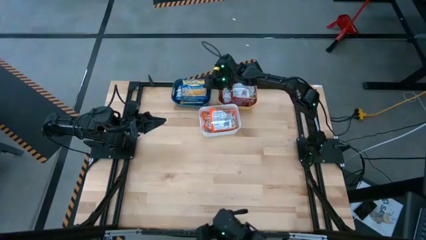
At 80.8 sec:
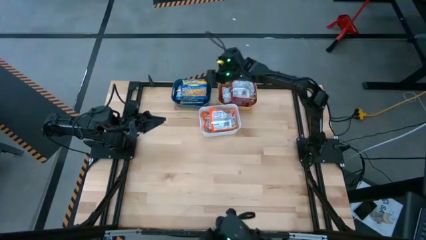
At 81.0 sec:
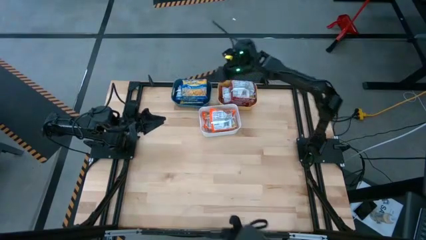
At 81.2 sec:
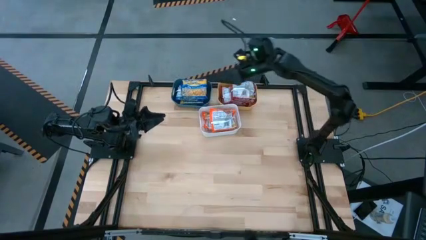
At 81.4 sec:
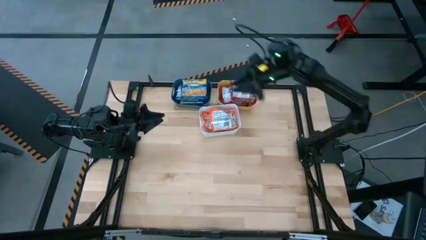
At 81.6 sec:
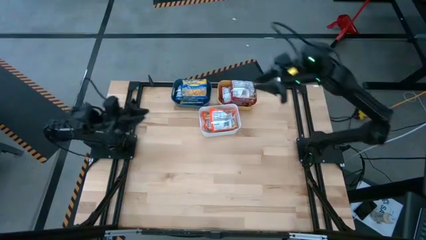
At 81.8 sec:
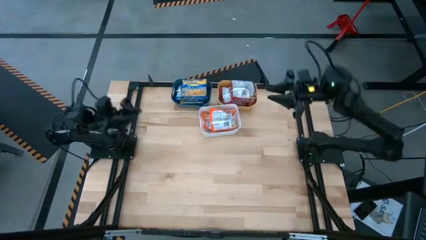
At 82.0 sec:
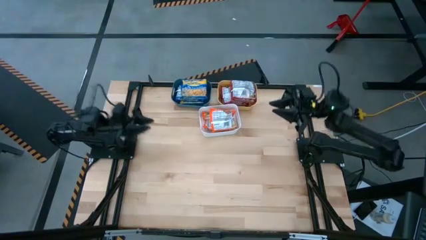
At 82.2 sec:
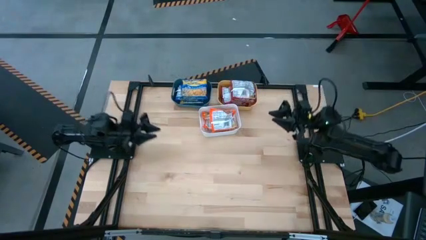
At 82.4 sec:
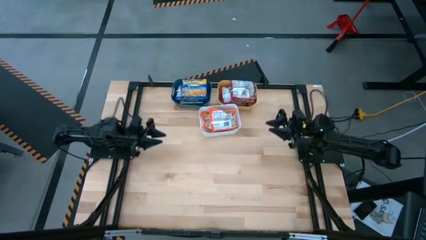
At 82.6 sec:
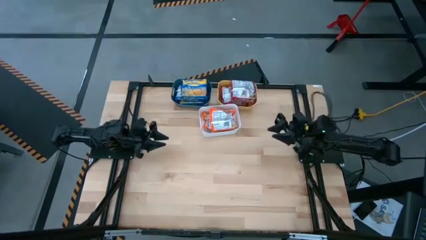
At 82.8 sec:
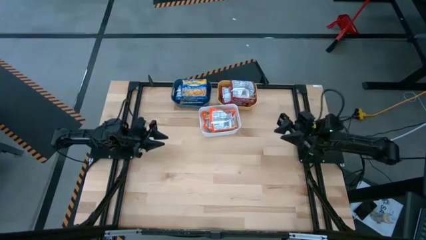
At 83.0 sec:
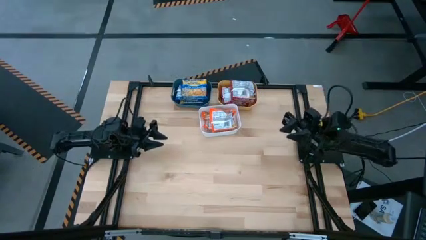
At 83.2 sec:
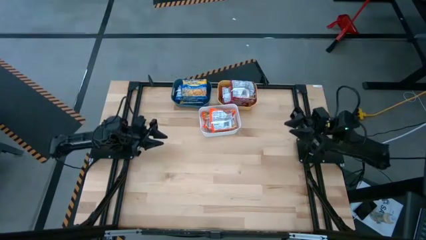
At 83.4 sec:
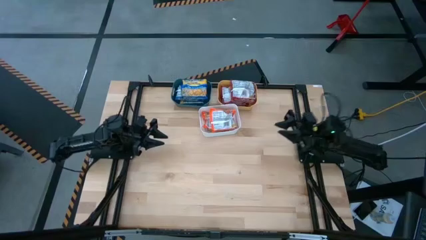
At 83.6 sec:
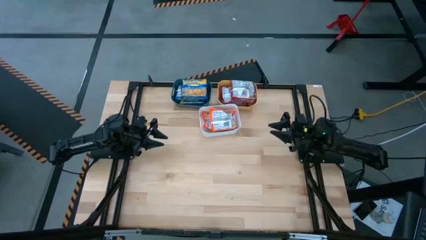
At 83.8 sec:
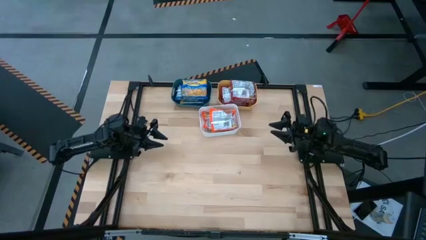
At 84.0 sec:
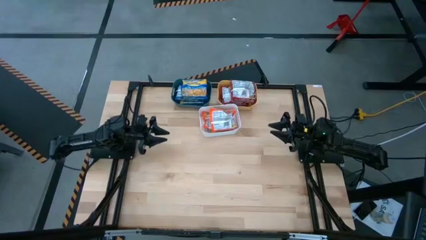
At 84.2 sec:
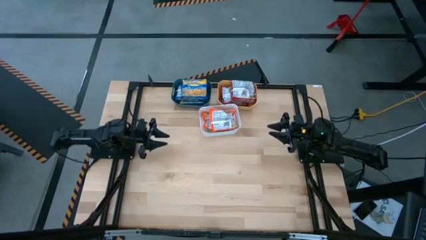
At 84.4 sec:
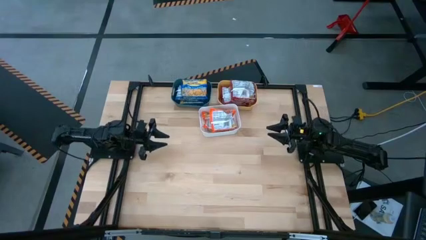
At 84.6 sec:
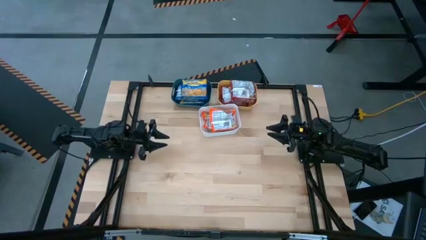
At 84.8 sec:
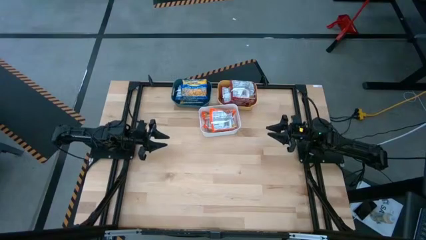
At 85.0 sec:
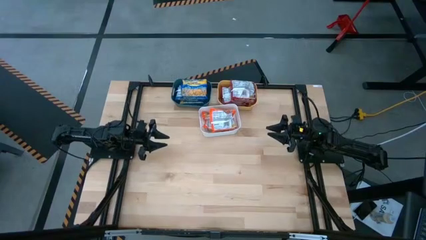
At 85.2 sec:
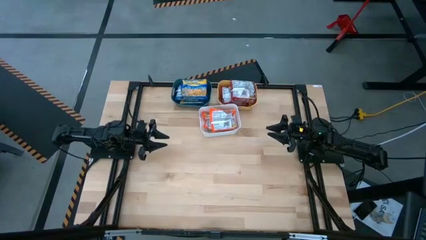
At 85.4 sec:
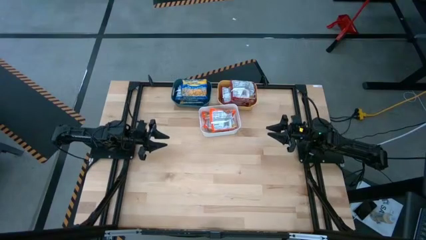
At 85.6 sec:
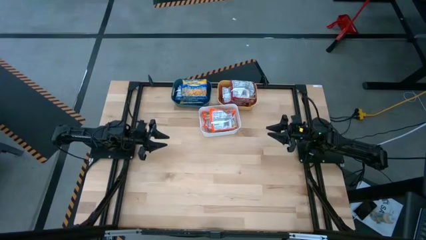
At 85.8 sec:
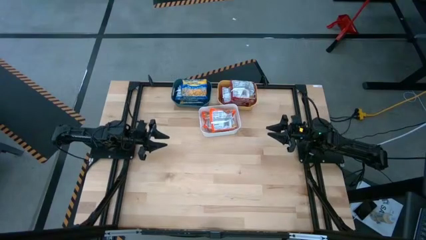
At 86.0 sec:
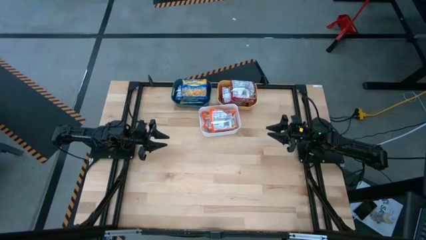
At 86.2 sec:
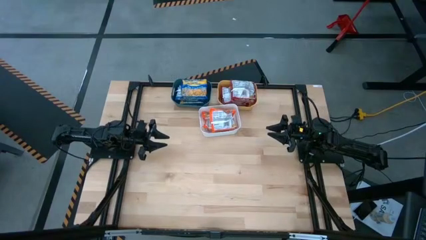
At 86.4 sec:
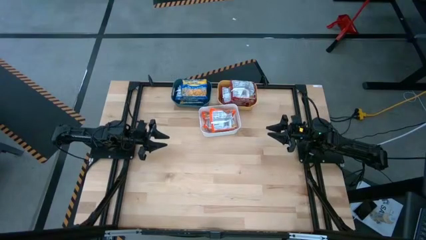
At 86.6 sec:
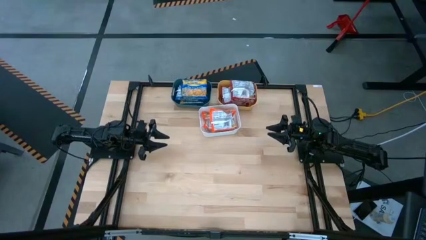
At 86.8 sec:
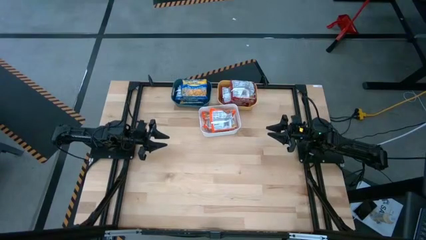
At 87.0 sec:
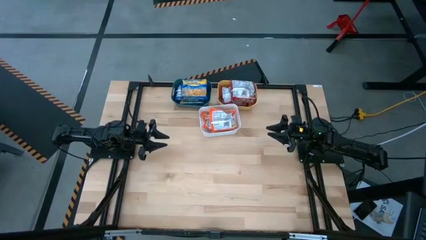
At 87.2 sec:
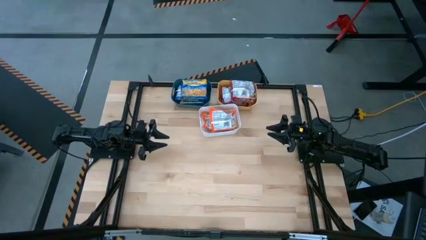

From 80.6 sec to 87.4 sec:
Task: Sort Maruchan noodles
Return to Home Position

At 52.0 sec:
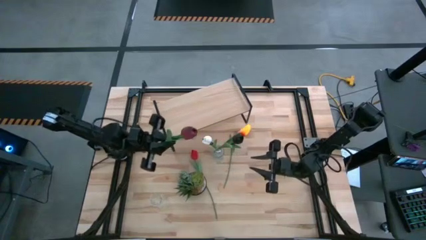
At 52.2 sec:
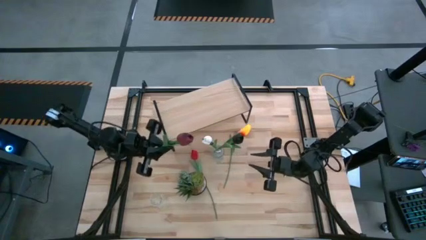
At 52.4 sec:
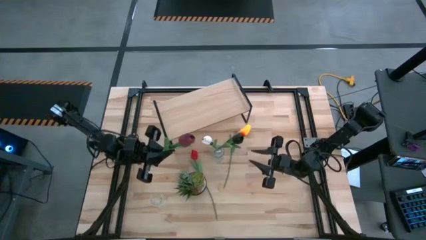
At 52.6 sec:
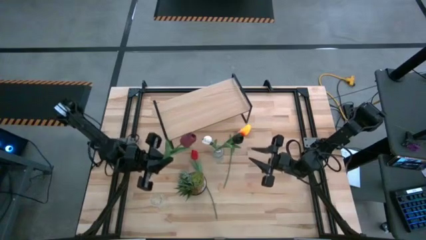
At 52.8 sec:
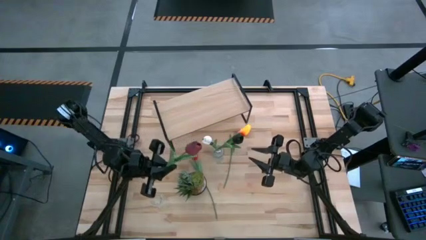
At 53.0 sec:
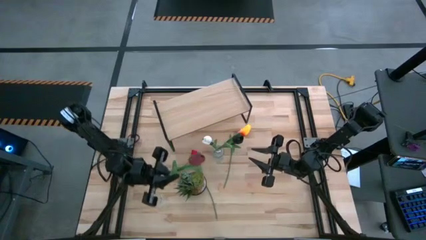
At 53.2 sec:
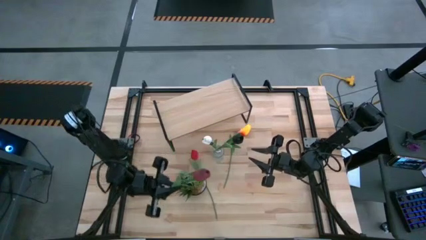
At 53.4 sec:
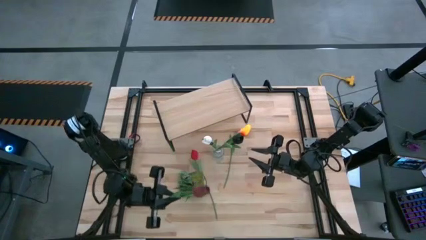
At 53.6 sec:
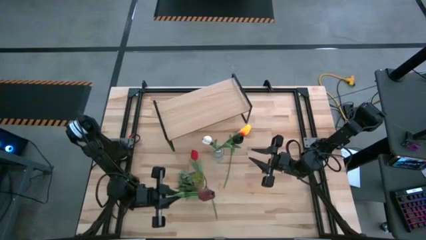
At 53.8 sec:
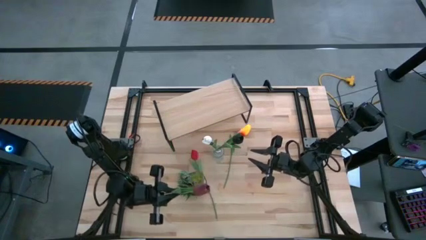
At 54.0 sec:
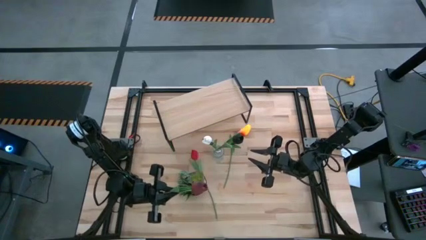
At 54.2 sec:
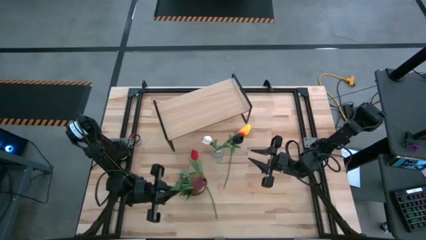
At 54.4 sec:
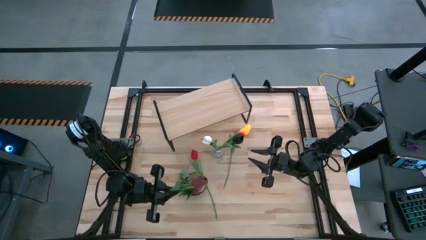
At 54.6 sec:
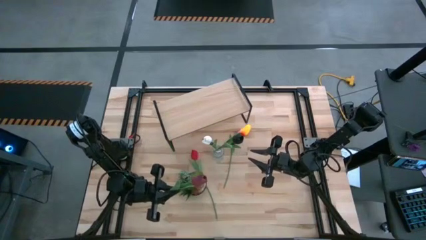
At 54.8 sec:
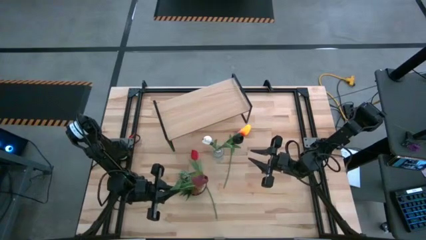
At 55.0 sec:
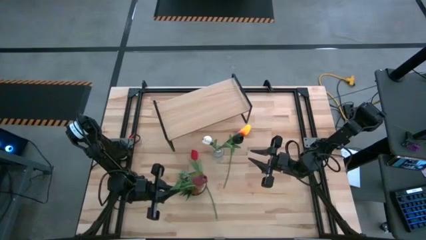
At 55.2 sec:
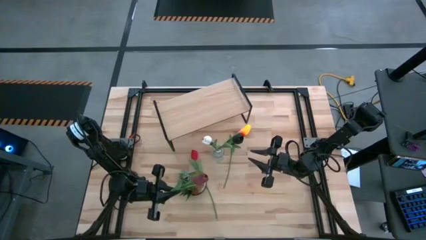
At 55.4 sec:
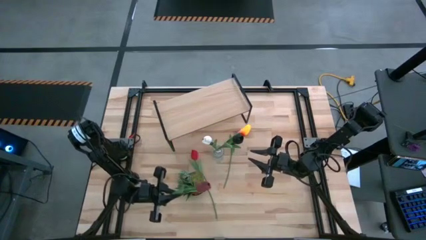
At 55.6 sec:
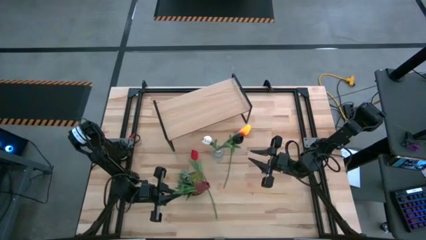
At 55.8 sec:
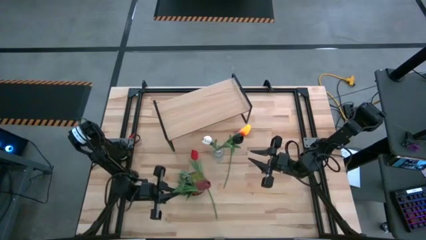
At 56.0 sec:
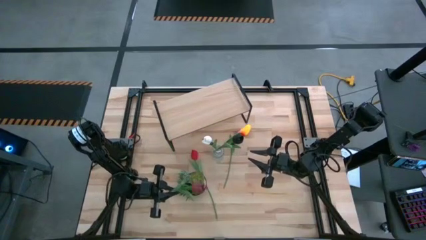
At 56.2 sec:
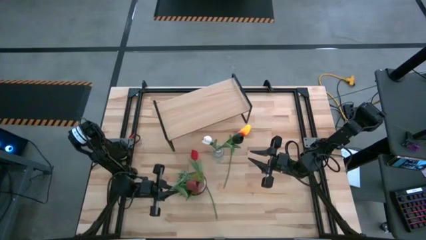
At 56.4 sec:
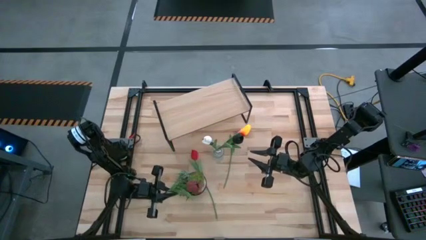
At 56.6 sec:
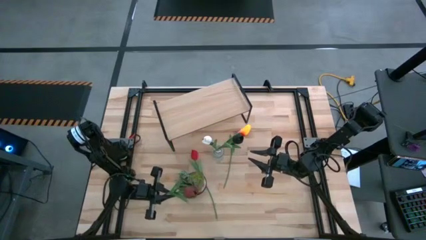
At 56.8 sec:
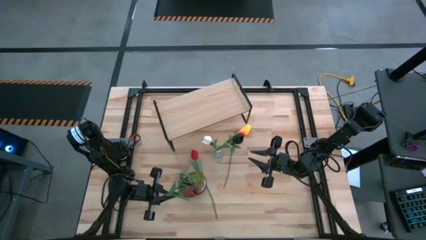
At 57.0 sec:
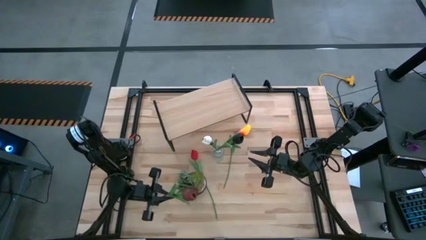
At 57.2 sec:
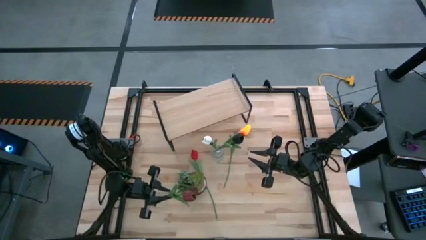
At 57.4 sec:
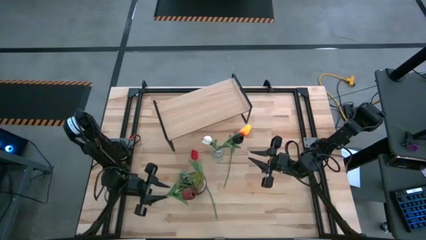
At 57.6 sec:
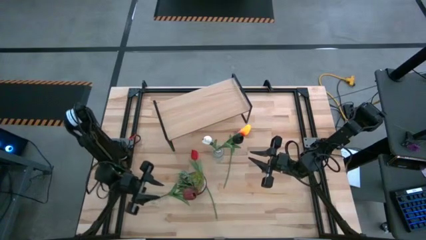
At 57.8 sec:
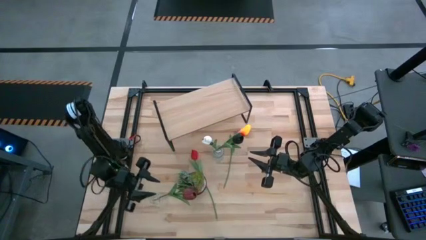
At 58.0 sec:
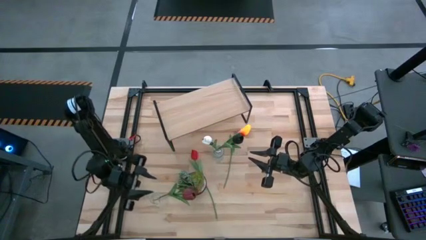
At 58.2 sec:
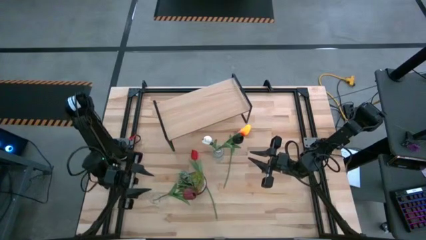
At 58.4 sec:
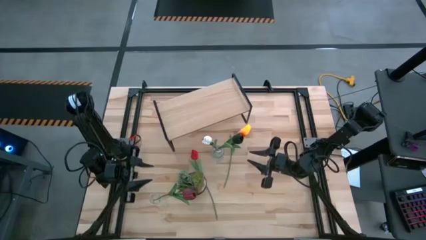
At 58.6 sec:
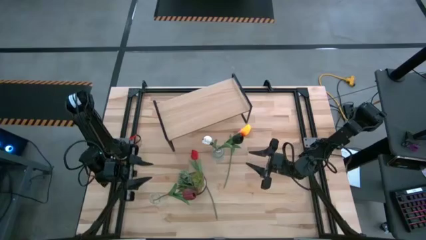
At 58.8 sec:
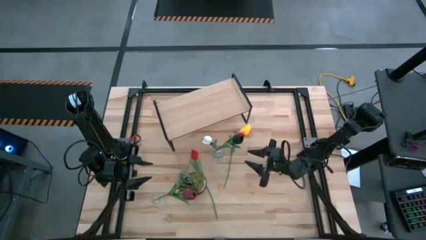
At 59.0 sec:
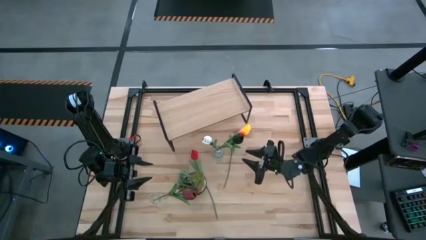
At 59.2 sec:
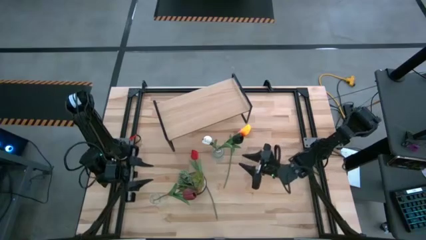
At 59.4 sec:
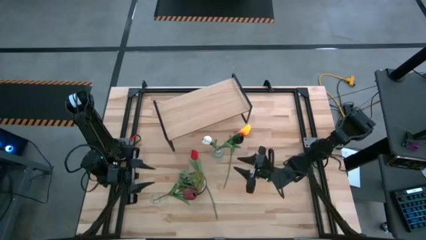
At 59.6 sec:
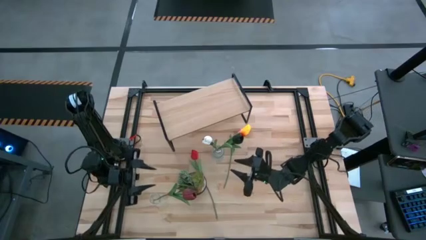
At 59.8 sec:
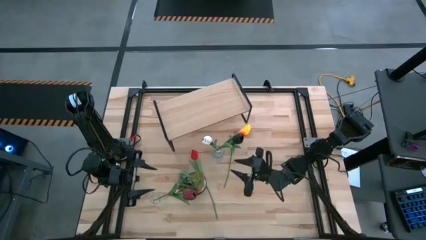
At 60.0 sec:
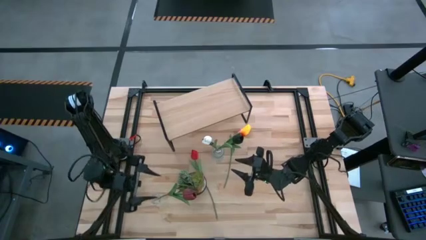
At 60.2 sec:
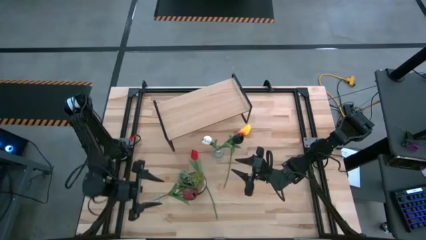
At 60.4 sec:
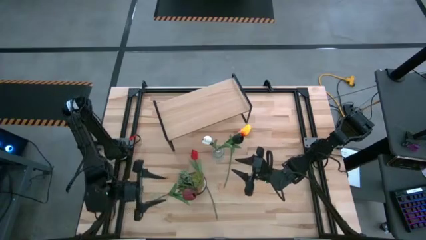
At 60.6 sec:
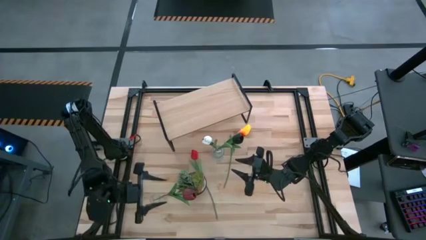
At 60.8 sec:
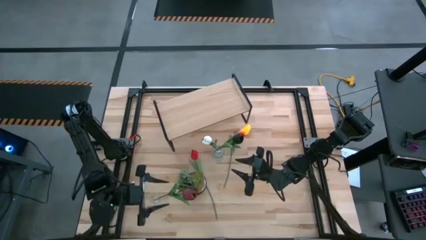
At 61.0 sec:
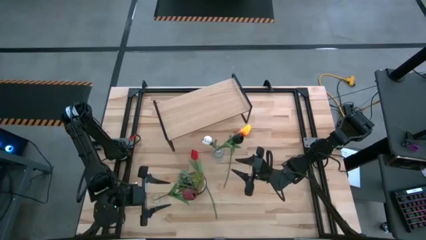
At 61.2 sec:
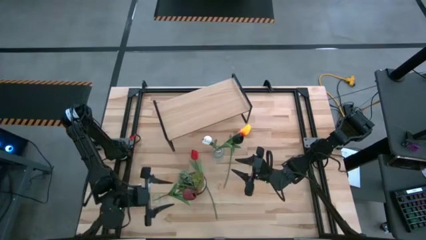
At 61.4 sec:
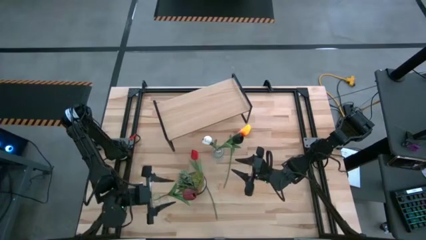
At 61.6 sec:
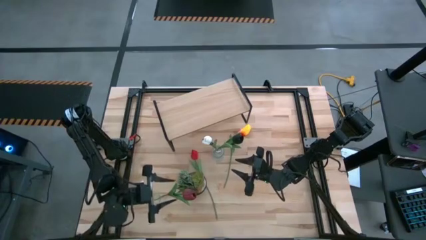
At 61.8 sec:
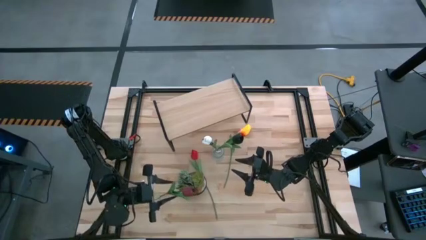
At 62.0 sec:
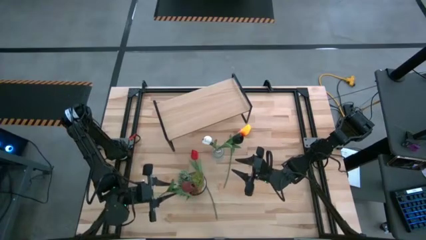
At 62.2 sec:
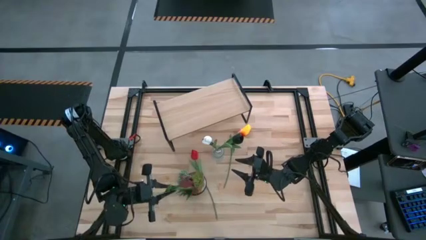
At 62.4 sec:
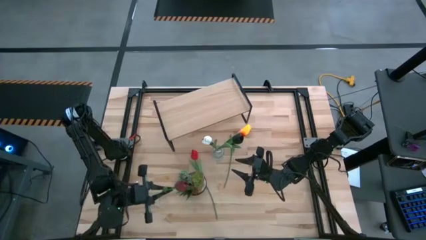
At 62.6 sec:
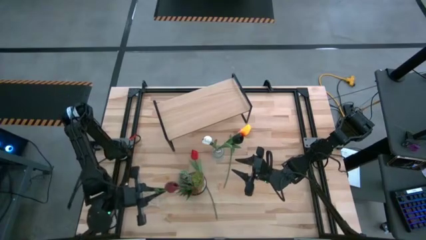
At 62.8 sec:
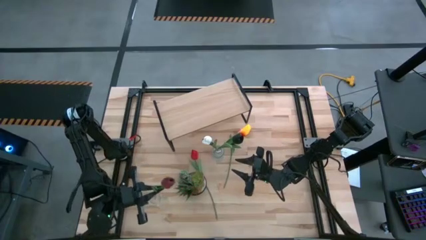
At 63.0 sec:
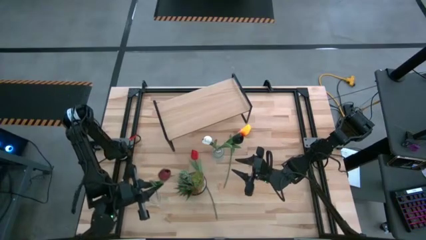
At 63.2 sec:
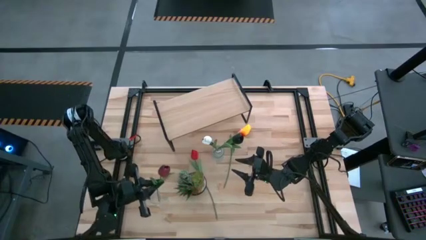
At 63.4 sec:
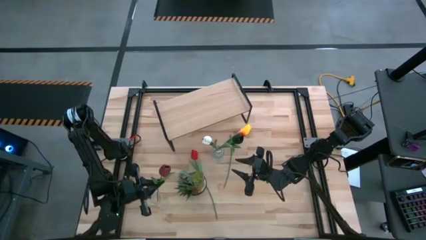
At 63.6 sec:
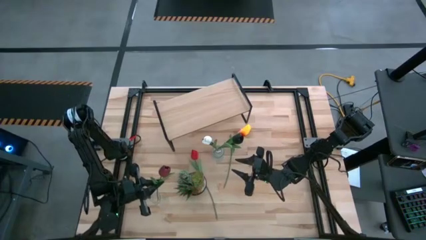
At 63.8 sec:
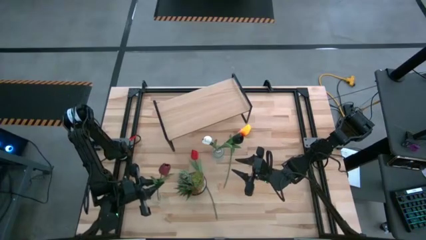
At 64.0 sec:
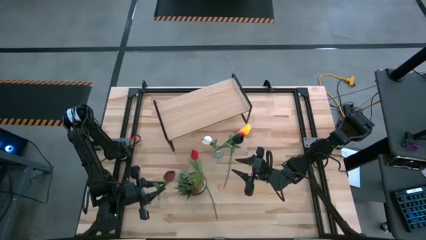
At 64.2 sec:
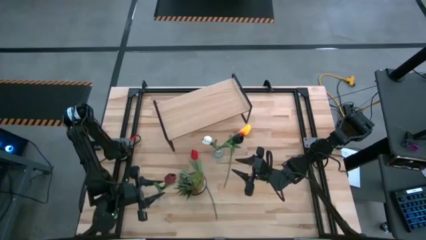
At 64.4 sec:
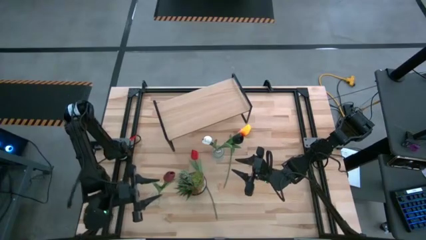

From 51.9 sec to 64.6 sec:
Task: Pick and place flowers into a vace then onto a shelf
Put the dark red tulip into the bottom transparent bin
